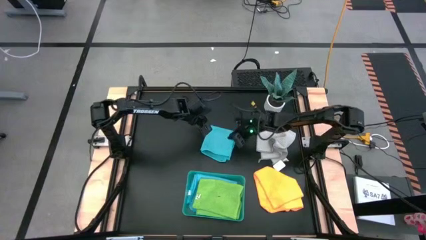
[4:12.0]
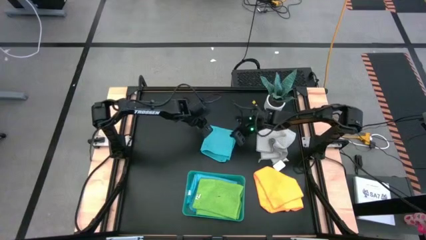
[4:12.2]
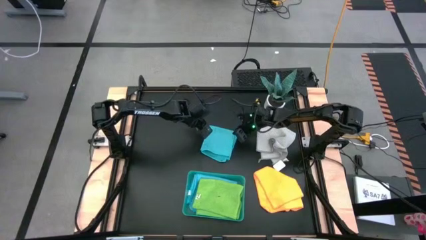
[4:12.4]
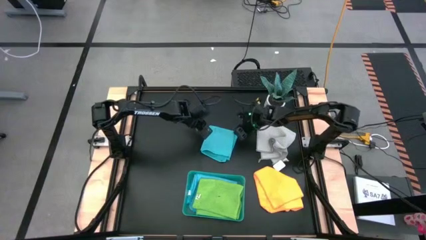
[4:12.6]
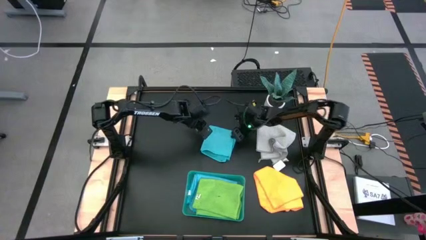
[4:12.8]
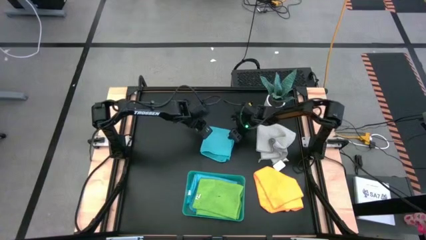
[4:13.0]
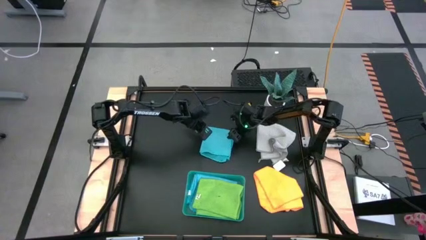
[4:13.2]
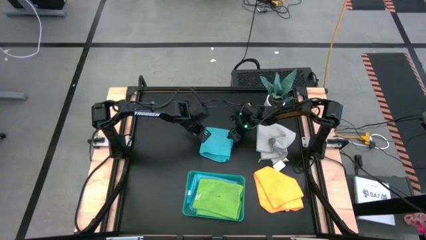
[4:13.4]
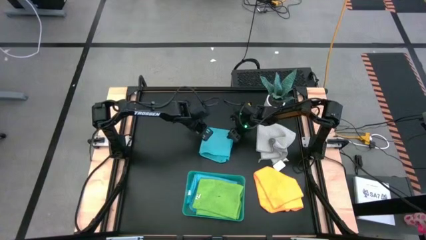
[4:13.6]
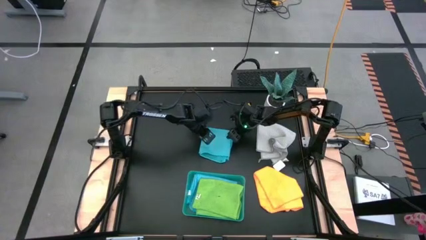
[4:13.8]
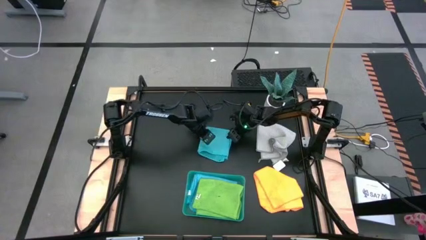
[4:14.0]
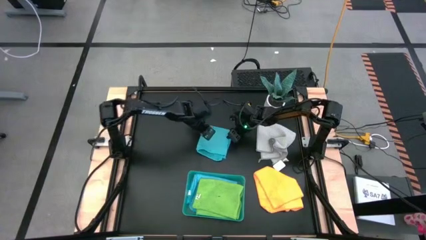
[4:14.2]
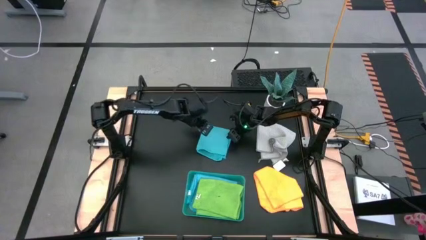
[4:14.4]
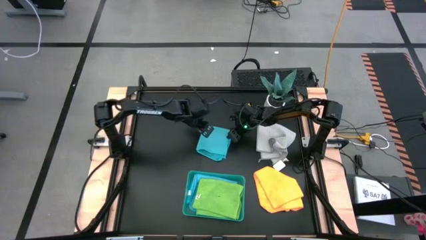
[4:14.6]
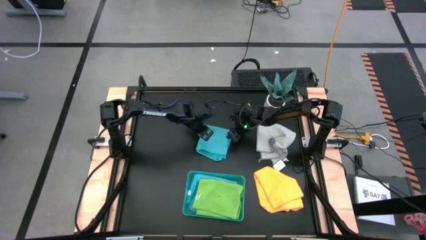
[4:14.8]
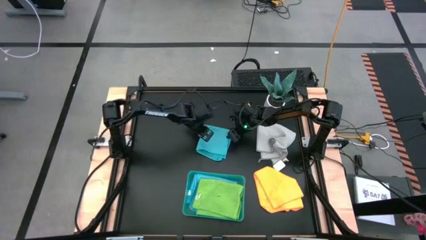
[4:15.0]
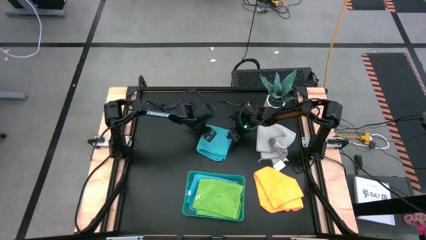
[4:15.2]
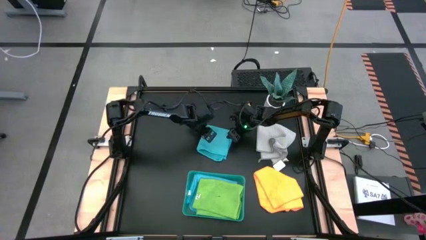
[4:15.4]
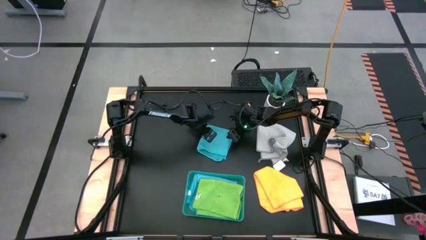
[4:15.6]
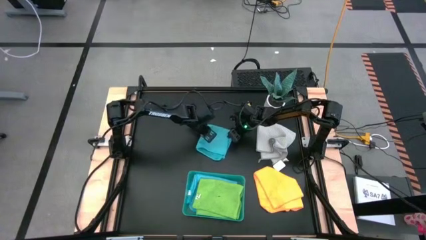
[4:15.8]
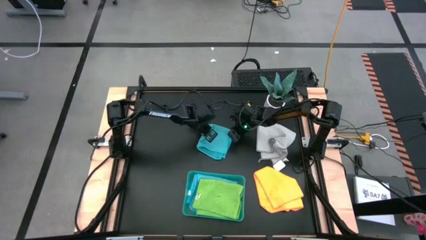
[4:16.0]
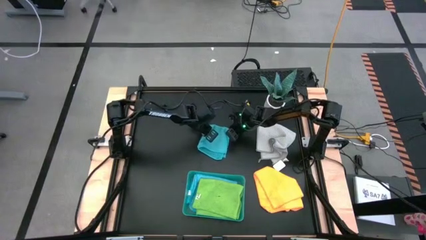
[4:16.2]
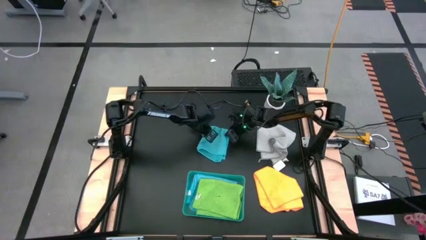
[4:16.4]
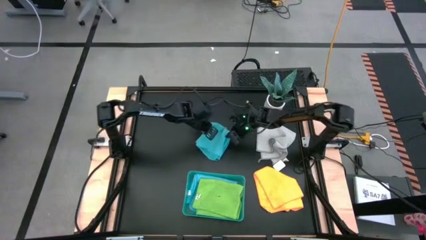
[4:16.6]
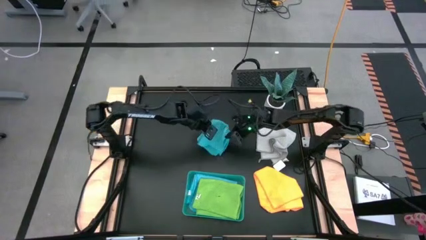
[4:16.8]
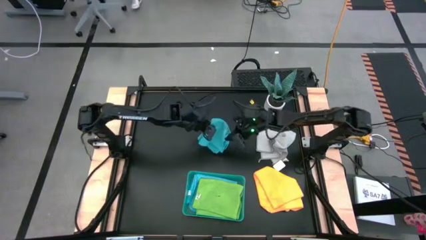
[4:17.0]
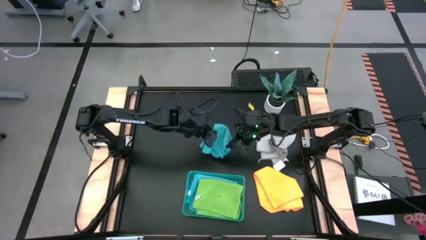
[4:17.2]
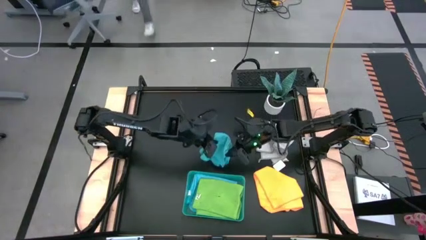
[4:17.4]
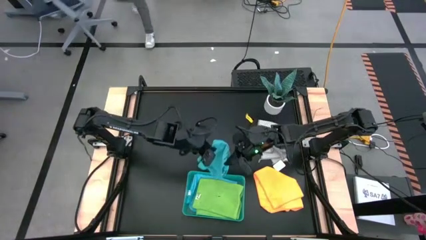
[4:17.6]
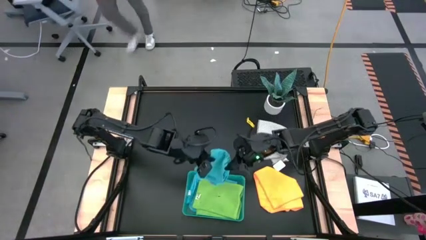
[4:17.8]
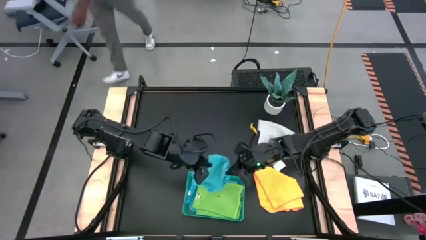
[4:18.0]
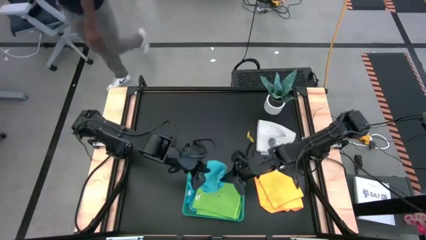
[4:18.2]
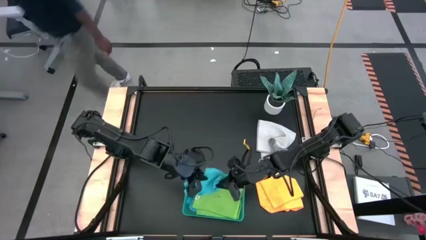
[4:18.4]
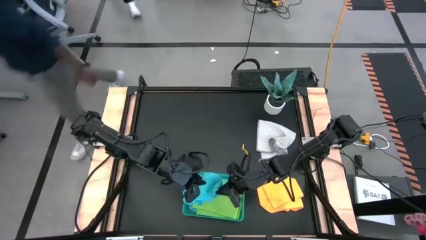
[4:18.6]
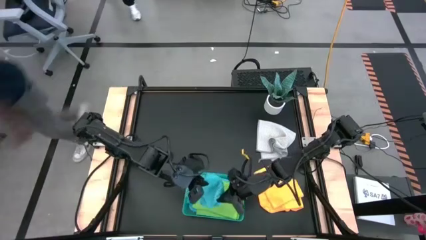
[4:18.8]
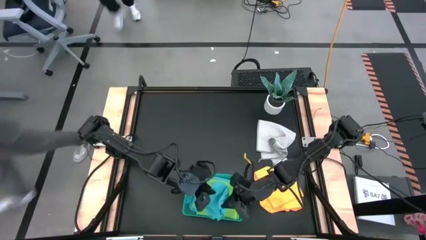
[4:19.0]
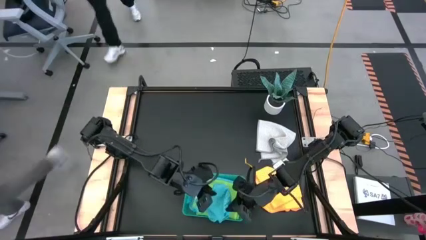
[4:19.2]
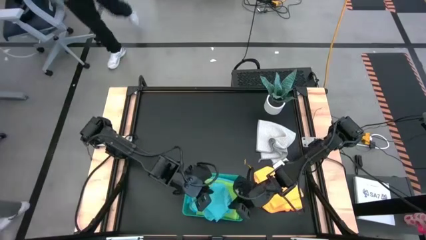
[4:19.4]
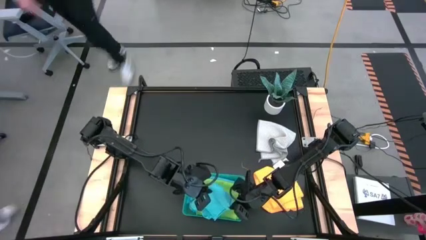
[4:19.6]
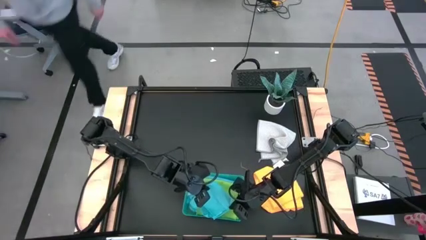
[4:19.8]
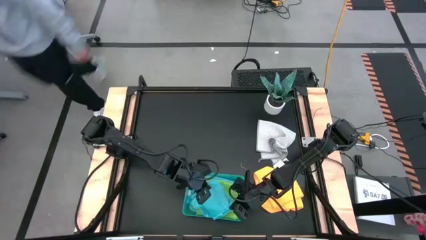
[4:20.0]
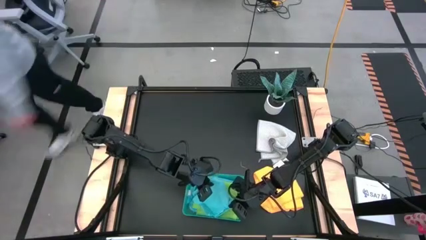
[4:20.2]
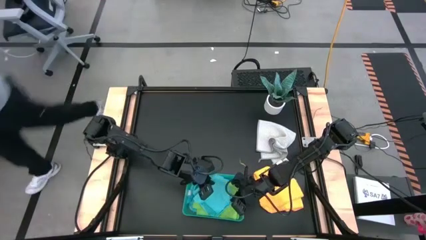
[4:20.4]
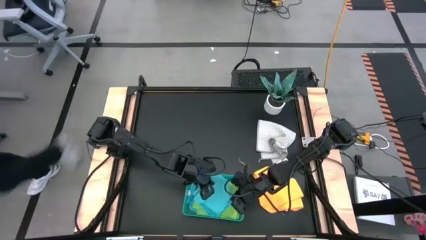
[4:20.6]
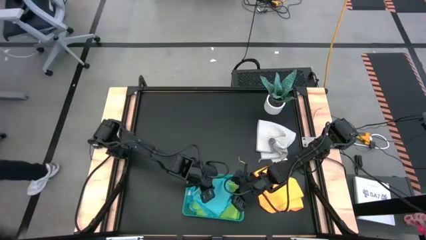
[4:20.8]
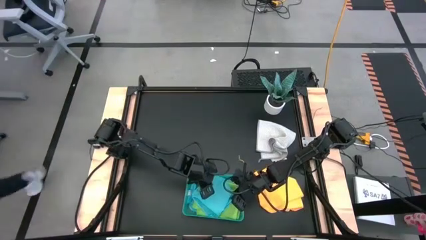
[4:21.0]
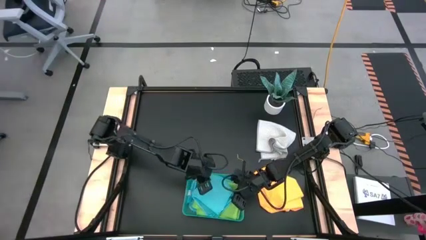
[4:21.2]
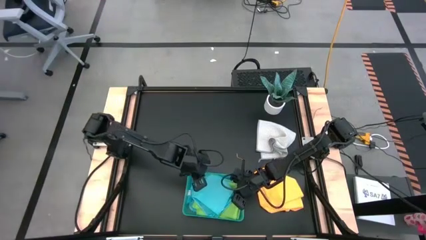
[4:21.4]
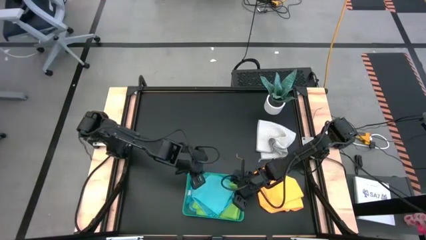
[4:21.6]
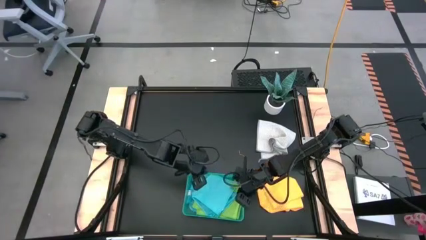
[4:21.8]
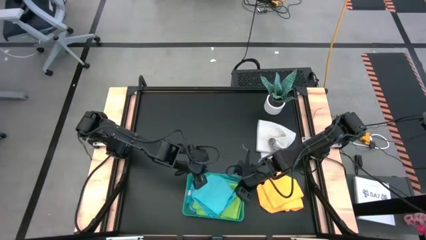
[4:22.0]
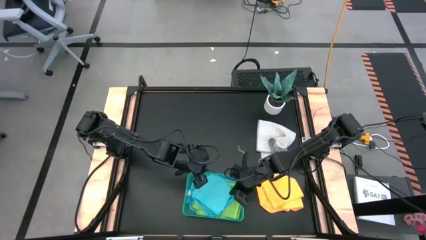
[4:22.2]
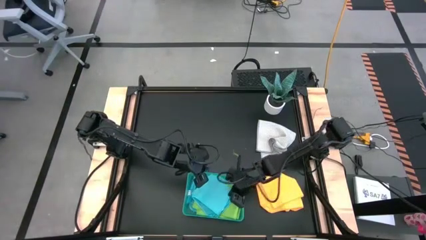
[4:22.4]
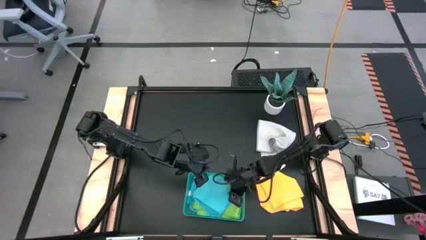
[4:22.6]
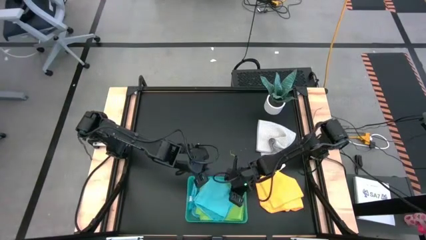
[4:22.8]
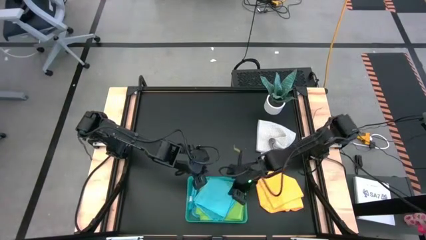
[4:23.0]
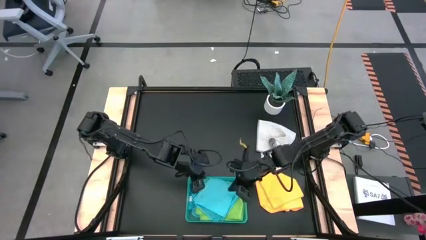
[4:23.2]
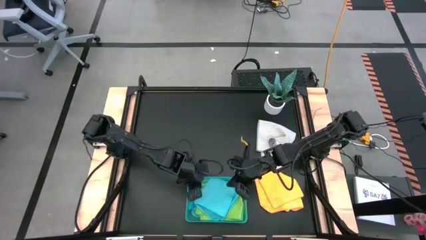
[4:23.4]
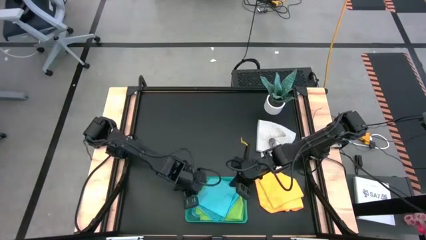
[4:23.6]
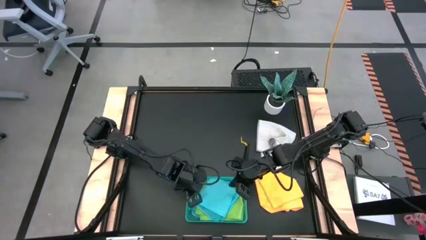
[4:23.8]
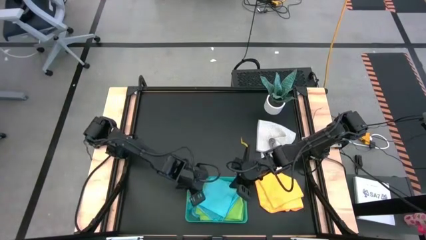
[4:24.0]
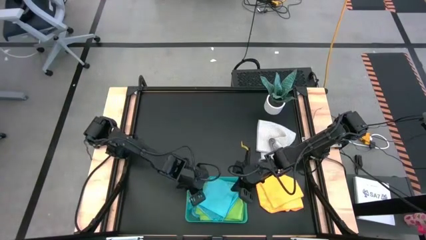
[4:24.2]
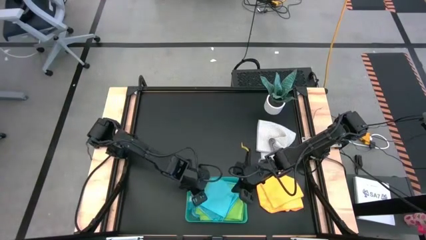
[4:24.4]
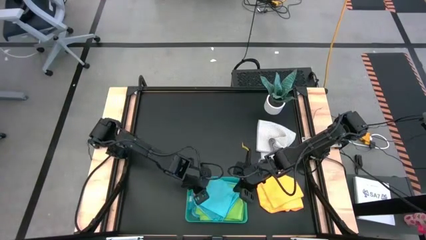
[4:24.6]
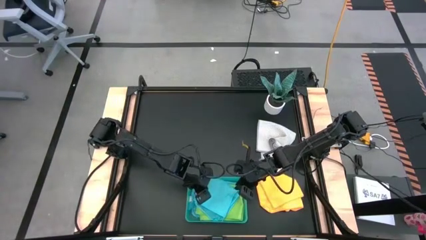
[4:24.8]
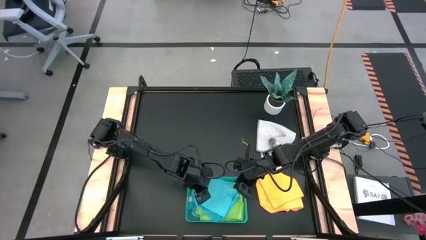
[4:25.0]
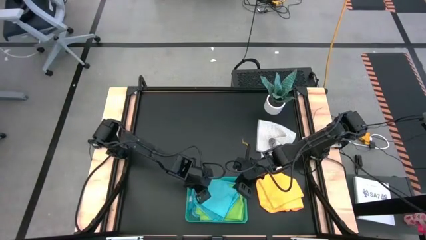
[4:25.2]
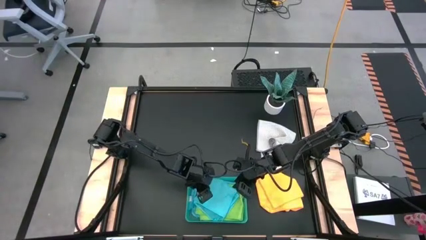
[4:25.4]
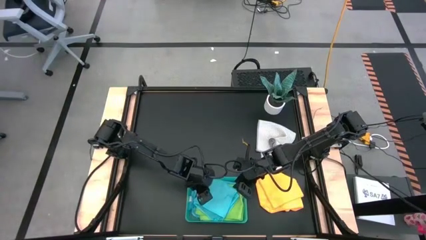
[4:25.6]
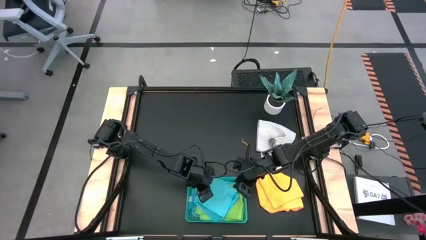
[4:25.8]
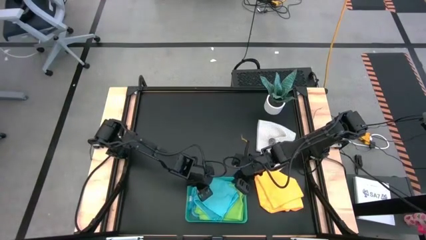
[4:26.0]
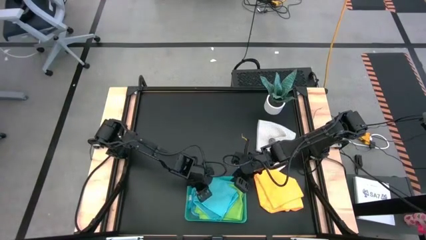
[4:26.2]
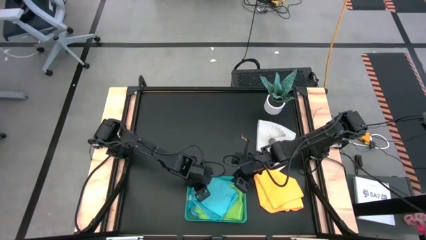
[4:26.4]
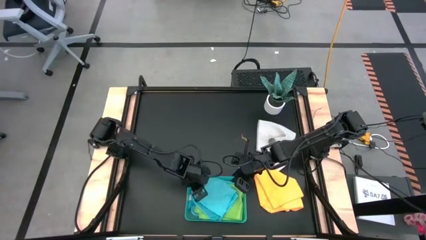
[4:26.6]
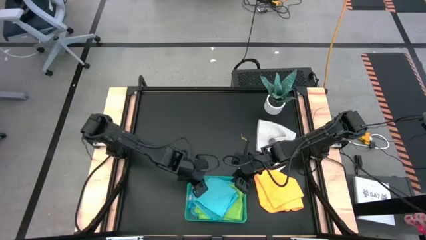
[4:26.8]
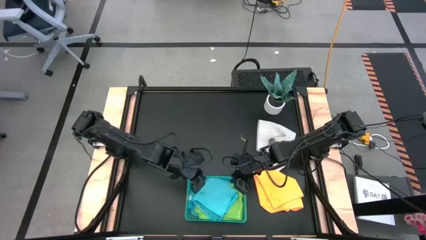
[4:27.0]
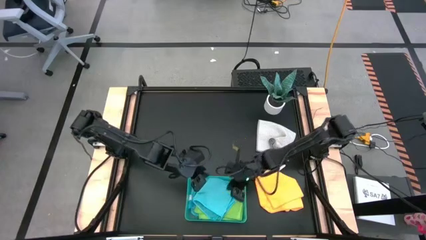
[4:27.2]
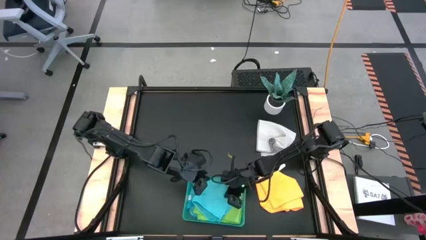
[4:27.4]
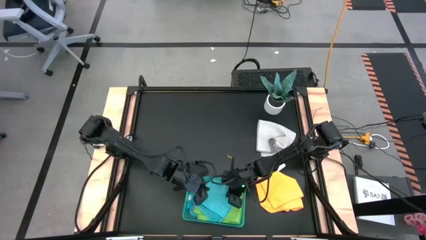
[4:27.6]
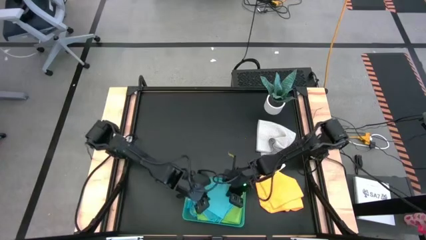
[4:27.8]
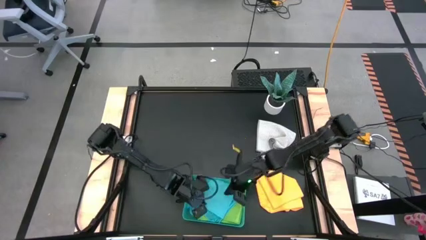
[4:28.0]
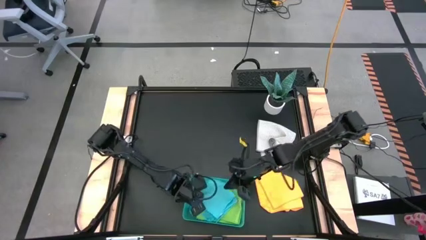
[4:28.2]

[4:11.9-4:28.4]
Task: Fold microfiber towels
Put the folded blue microfiber cloth into the green transparent bin
